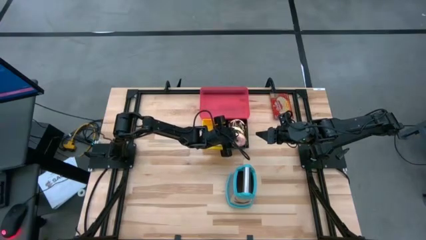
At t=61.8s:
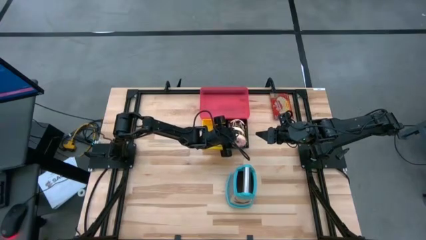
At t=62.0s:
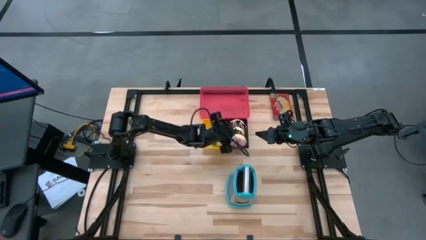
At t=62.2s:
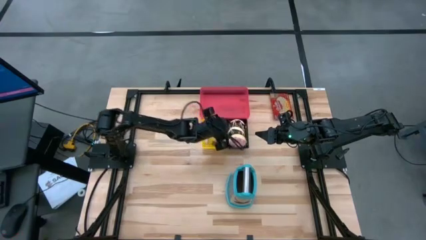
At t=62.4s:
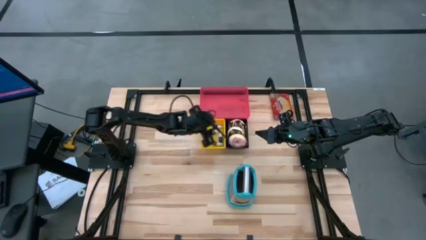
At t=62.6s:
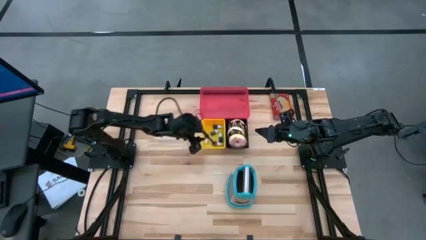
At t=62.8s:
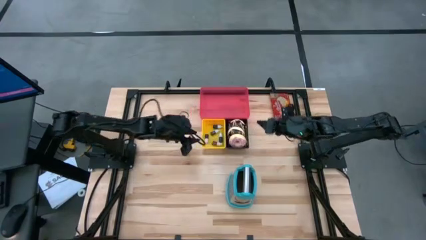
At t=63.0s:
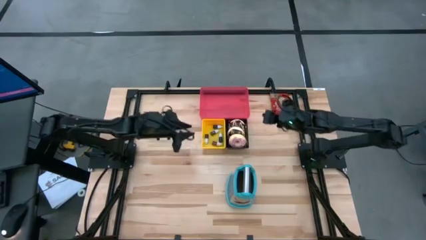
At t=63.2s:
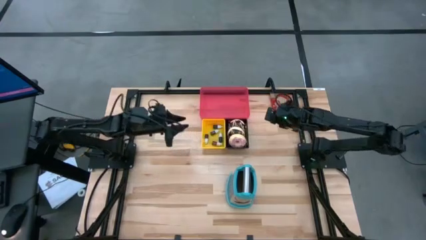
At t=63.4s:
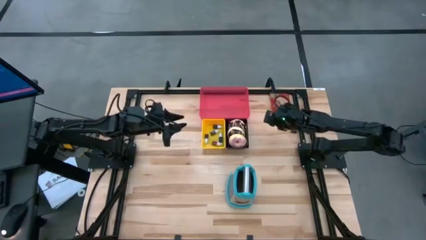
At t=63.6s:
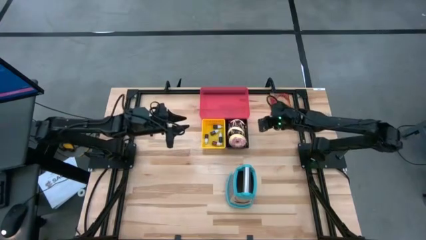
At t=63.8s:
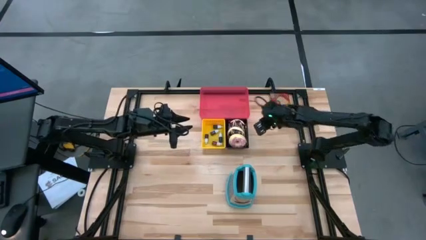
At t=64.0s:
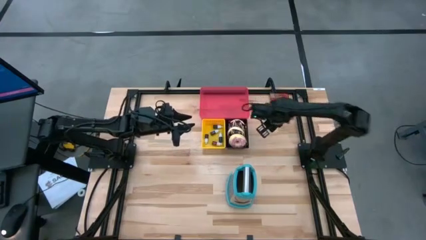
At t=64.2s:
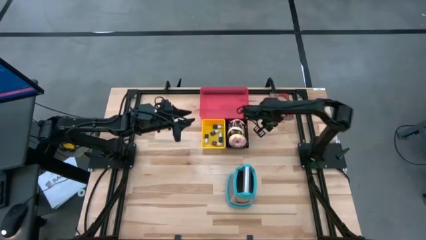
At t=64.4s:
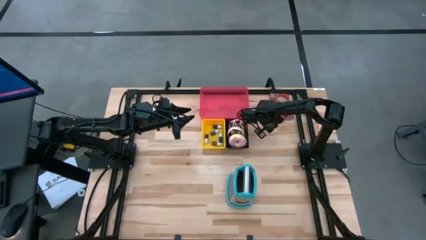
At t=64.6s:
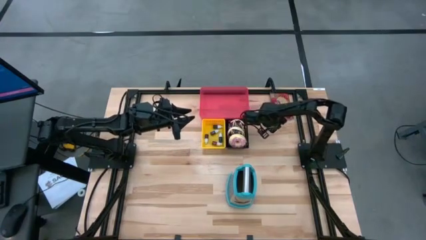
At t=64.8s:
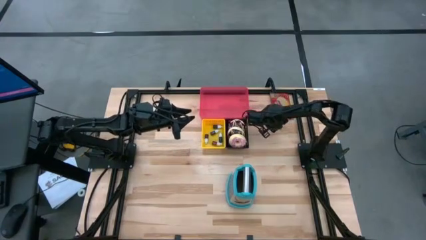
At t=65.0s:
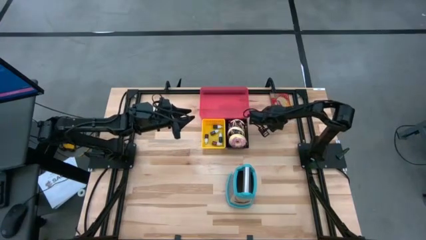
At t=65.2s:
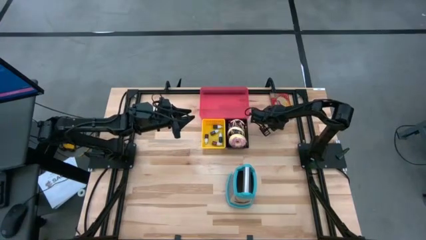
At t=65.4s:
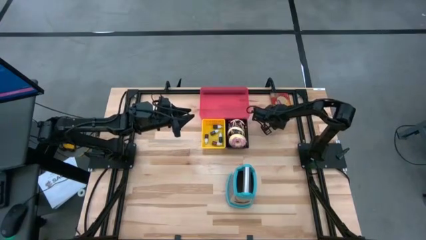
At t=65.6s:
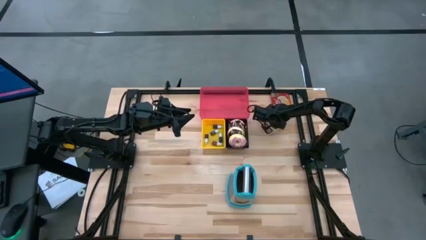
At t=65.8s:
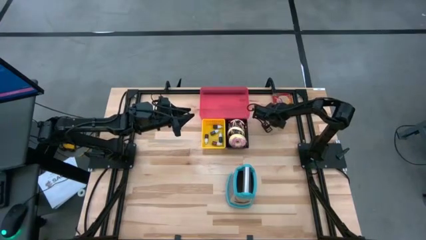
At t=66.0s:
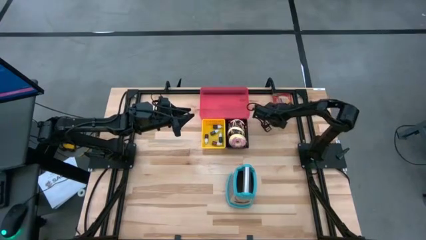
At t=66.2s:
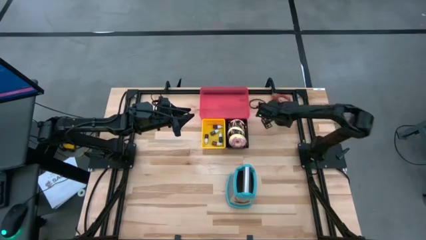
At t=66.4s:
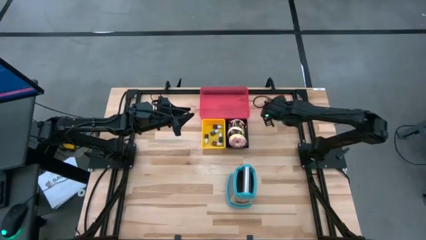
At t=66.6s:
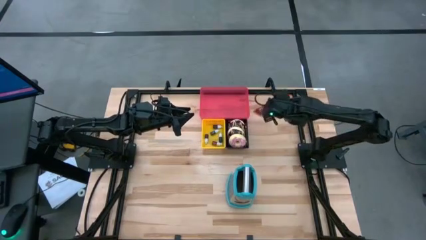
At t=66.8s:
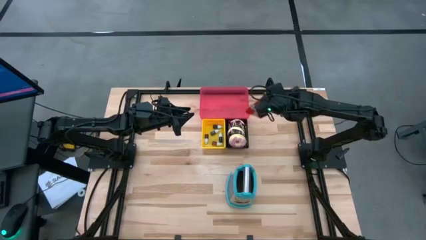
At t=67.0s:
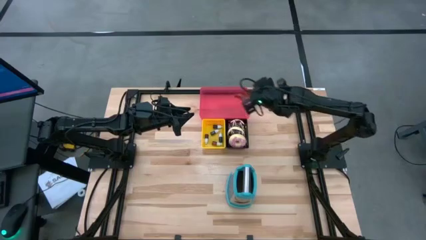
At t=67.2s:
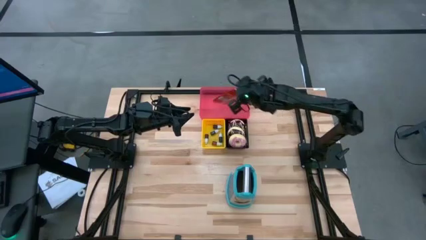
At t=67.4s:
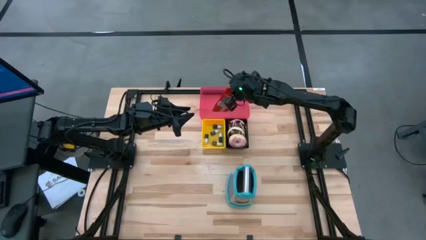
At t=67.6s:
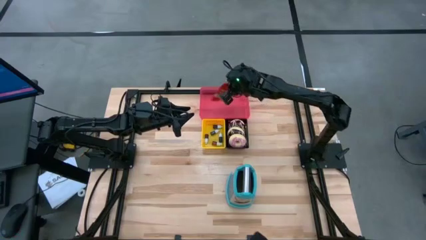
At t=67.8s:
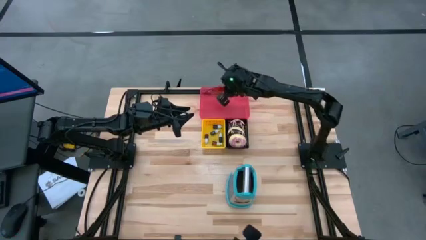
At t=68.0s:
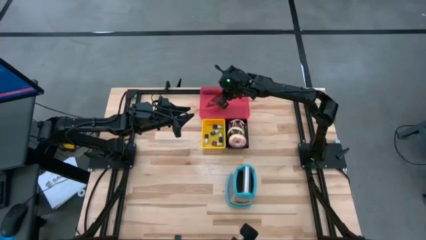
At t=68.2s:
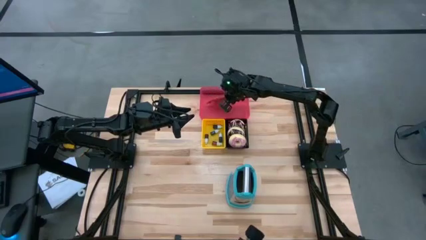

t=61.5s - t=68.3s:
Put the red popcorn bag into the red bin

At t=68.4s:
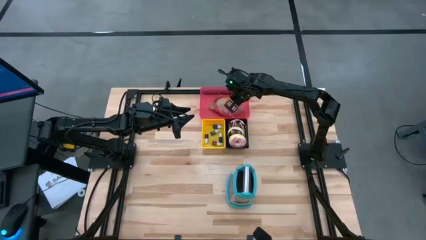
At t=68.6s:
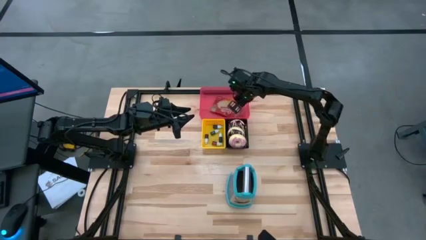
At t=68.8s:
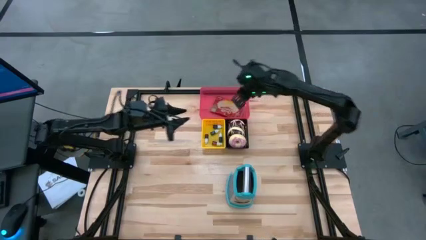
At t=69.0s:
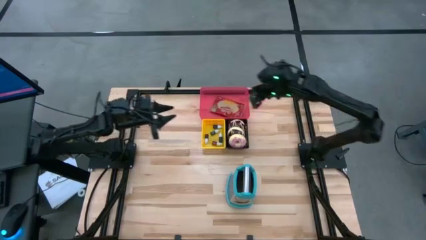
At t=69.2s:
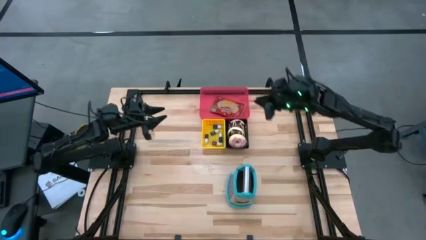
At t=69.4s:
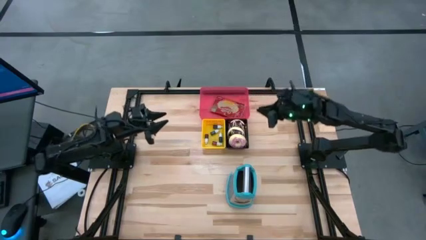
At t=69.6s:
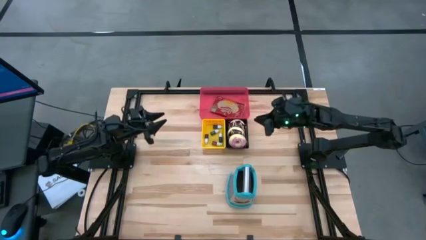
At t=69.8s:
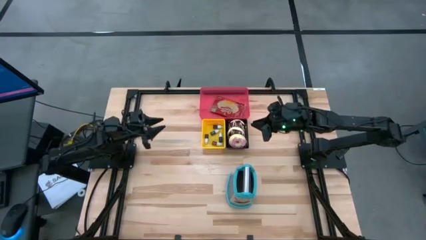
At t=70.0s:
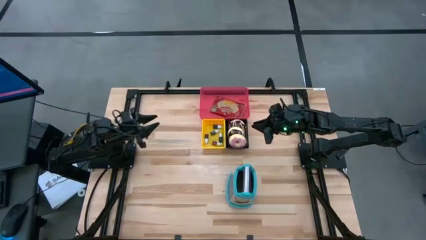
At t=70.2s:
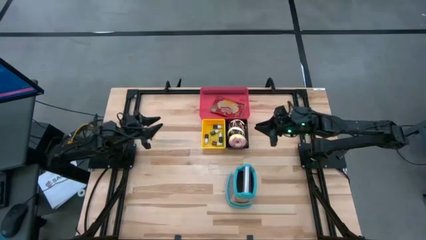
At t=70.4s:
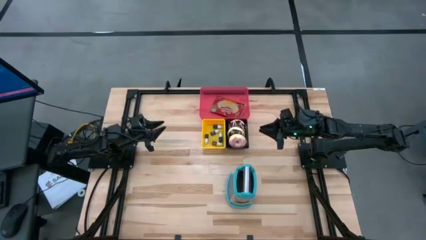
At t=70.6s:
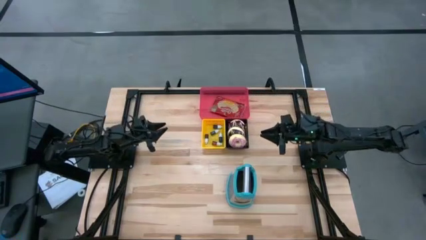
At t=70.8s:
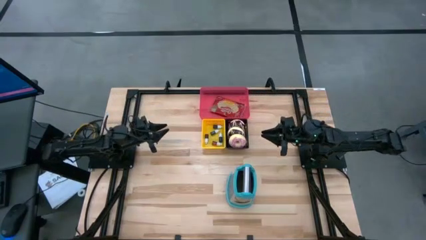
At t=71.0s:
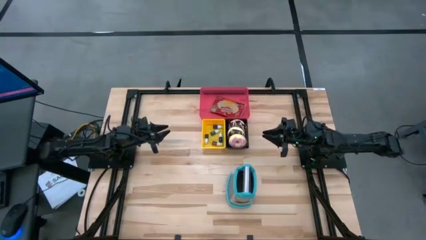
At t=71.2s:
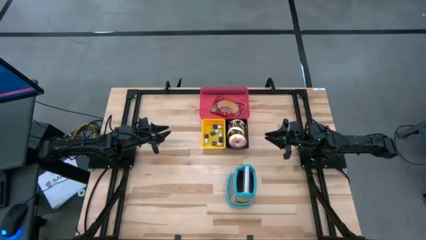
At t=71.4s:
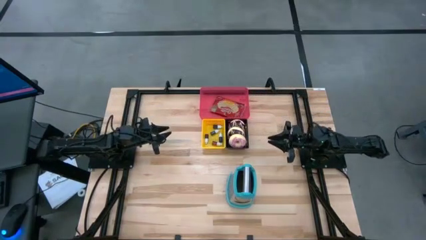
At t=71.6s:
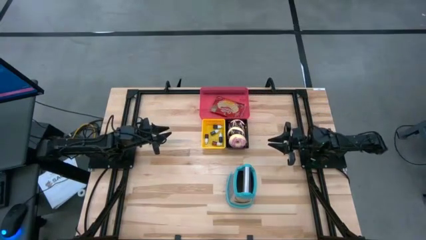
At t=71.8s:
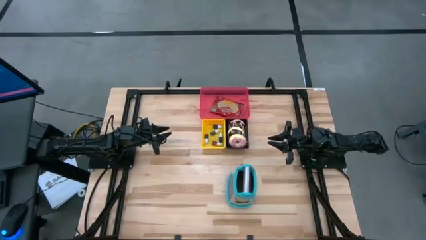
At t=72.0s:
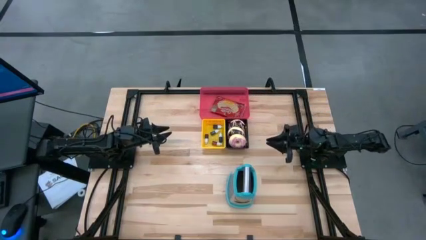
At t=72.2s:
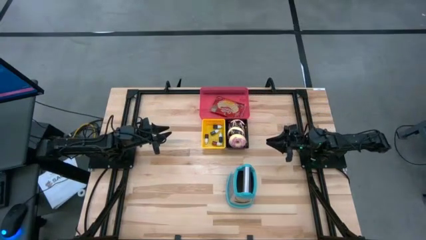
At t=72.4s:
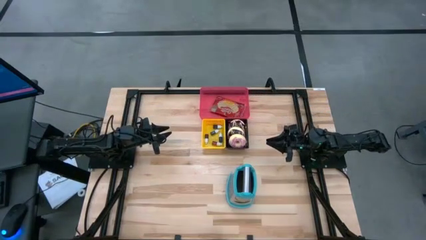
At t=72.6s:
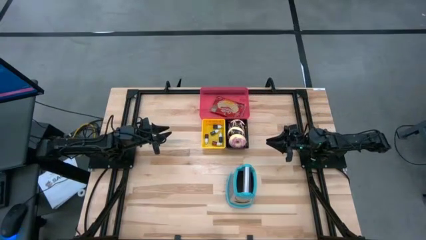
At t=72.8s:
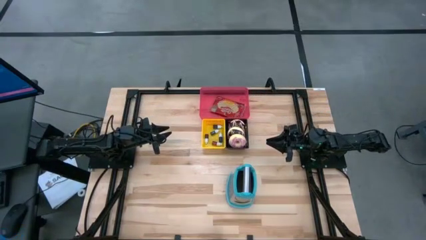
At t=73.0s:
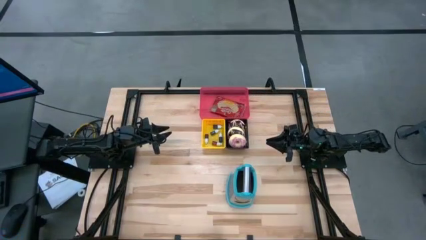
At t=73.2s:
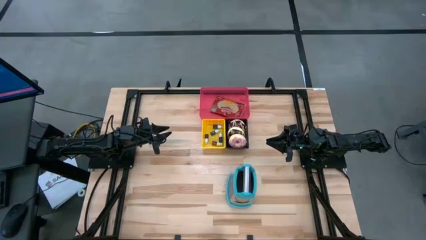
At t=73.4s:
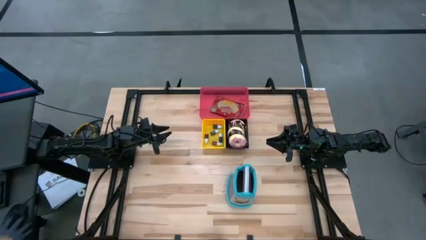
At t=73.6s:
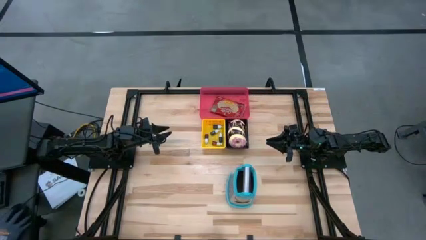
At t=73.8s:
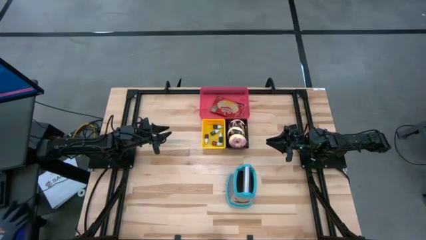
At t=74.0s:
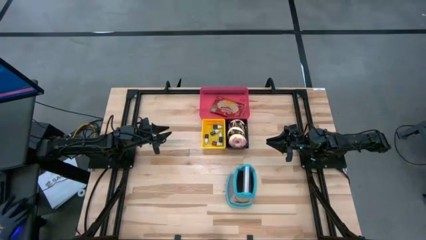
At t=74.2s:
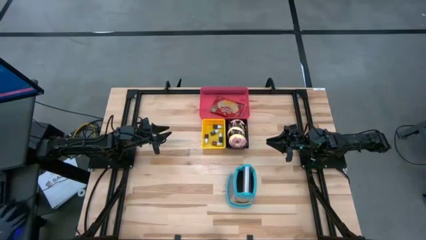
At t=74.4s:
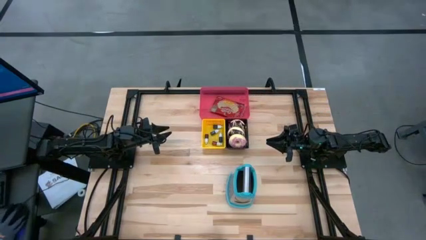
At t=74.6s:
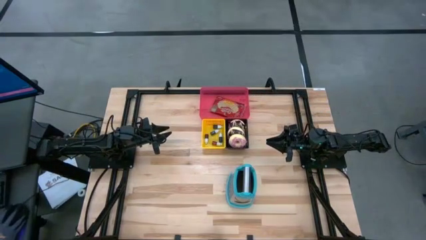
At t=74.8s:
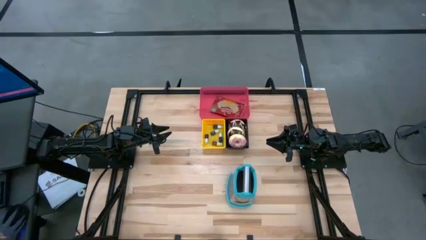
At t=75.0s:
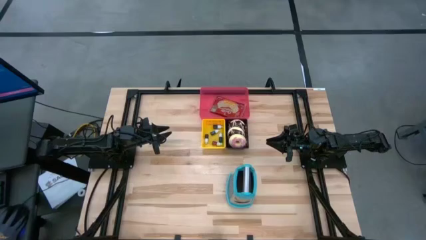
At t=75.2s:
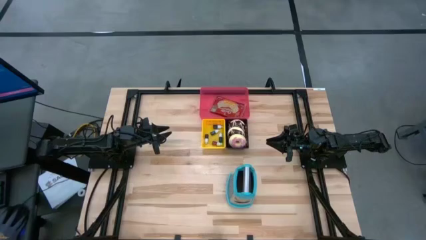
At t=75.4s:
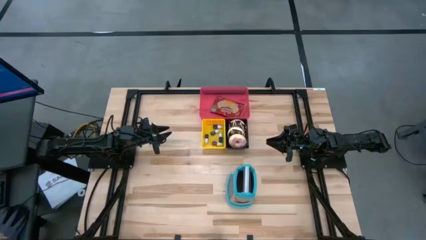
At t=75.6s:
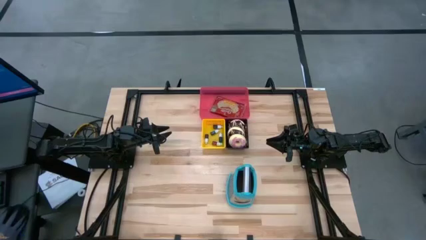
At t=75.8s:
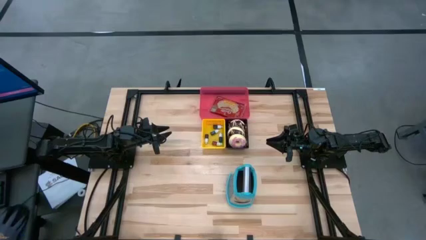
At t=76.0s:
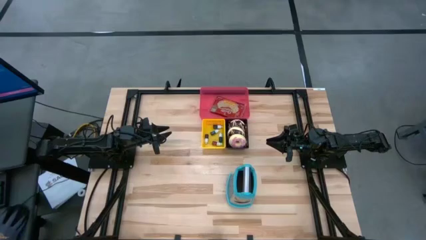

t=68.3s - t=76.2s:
Return to Home Position
